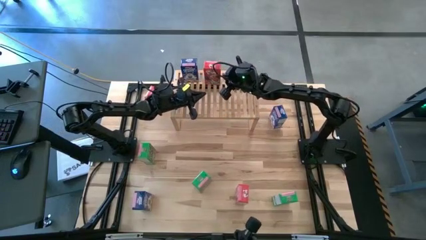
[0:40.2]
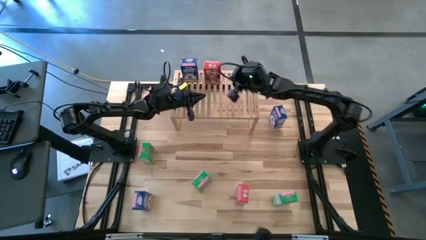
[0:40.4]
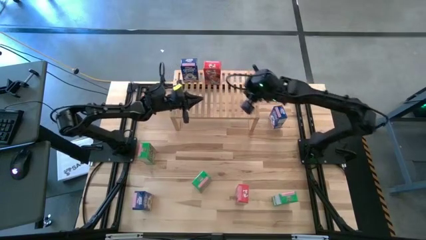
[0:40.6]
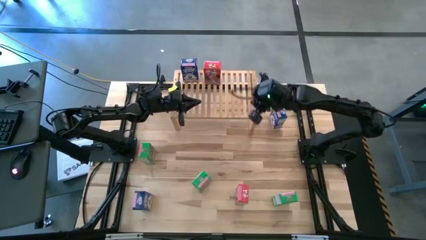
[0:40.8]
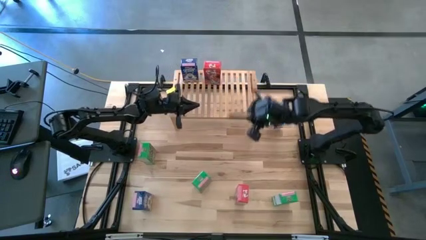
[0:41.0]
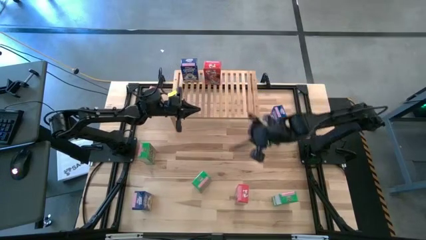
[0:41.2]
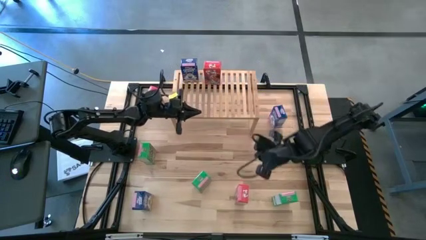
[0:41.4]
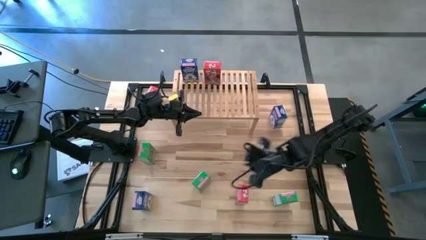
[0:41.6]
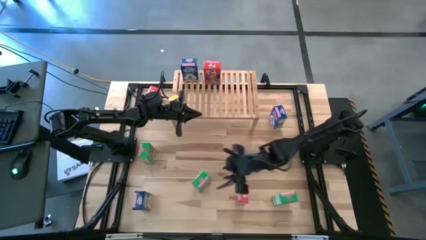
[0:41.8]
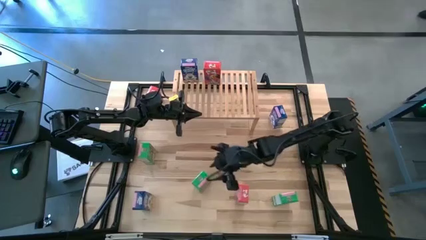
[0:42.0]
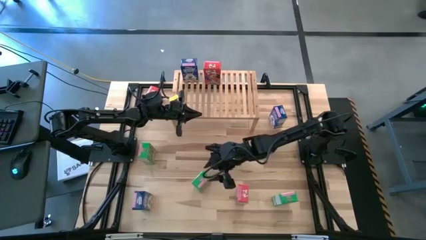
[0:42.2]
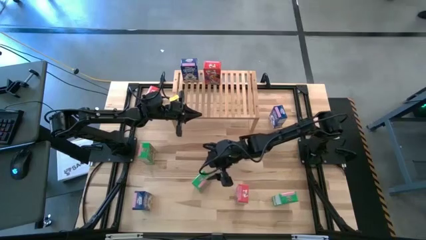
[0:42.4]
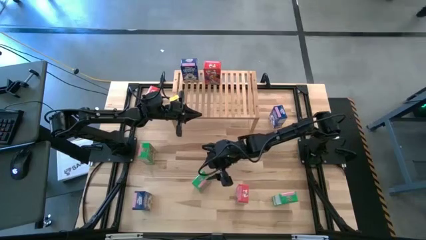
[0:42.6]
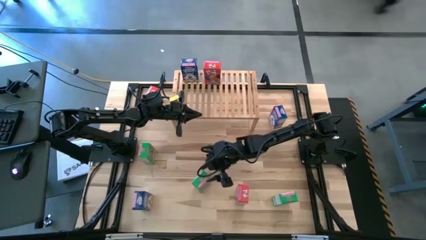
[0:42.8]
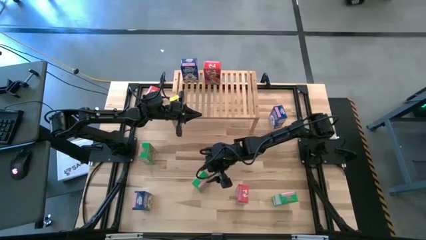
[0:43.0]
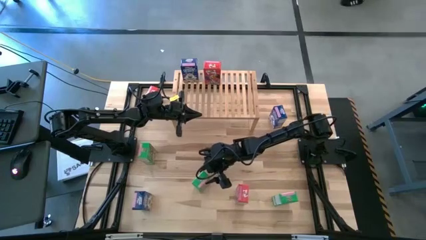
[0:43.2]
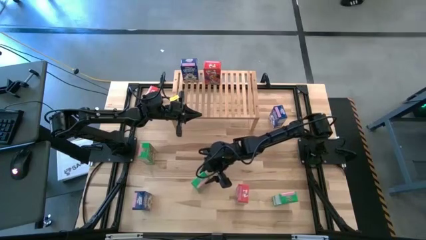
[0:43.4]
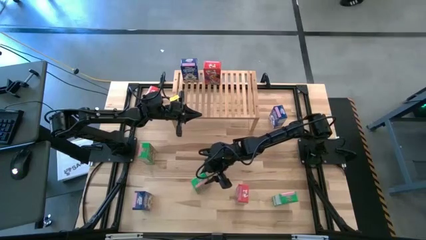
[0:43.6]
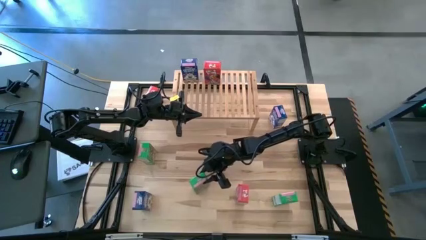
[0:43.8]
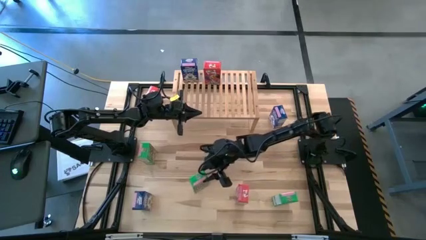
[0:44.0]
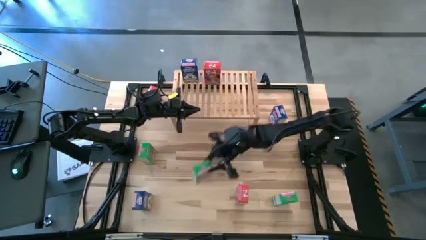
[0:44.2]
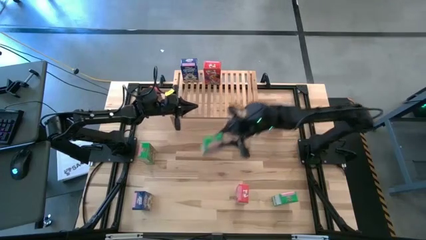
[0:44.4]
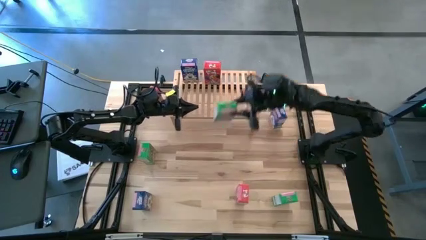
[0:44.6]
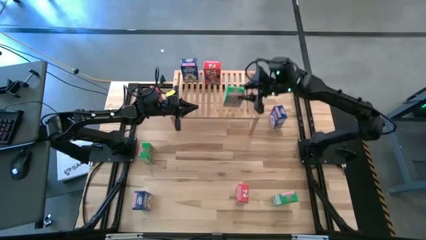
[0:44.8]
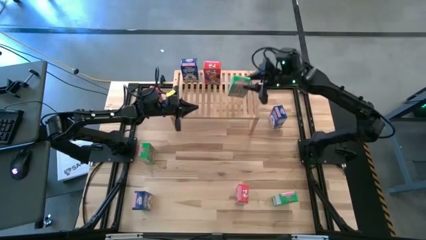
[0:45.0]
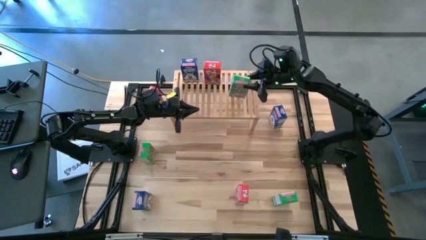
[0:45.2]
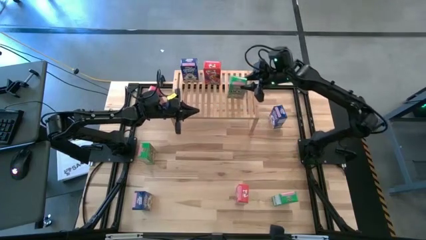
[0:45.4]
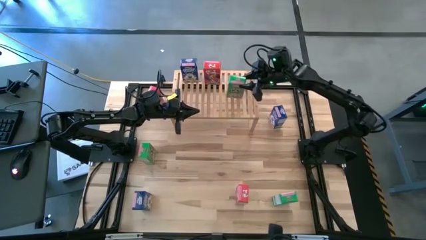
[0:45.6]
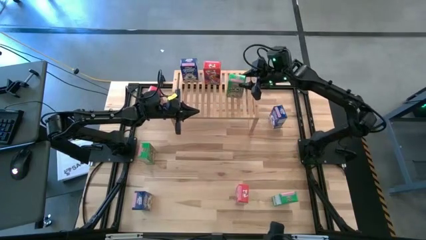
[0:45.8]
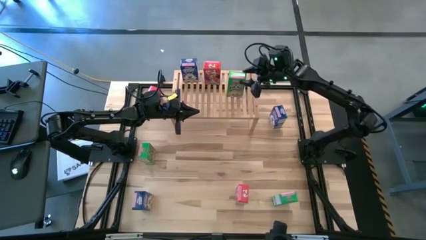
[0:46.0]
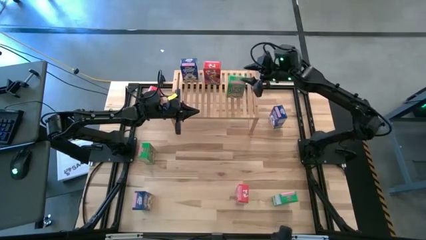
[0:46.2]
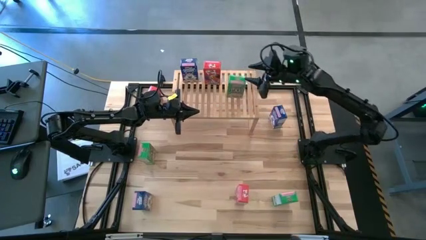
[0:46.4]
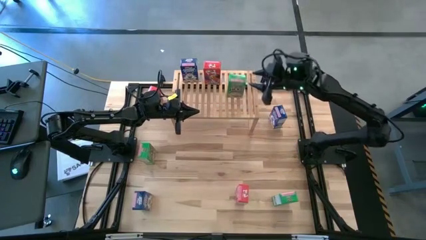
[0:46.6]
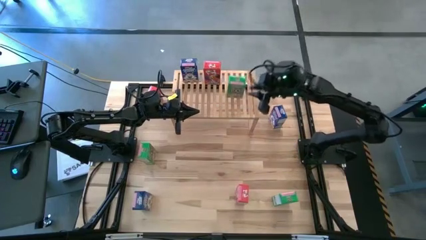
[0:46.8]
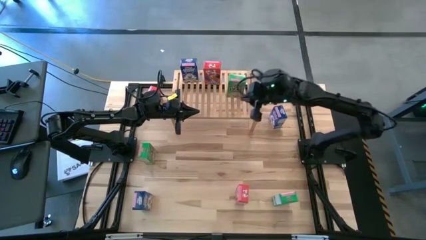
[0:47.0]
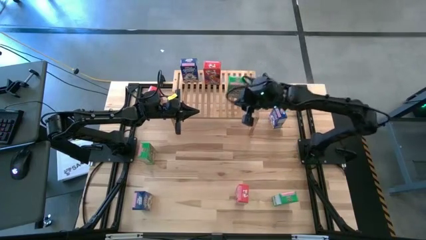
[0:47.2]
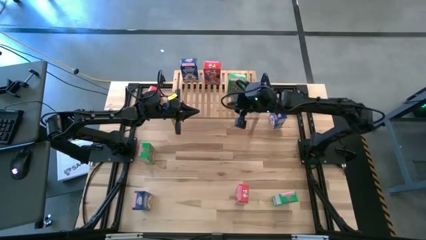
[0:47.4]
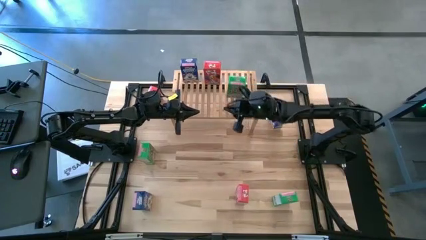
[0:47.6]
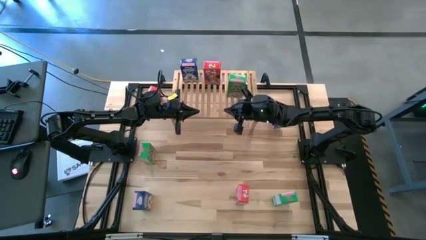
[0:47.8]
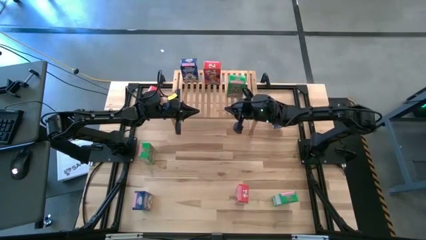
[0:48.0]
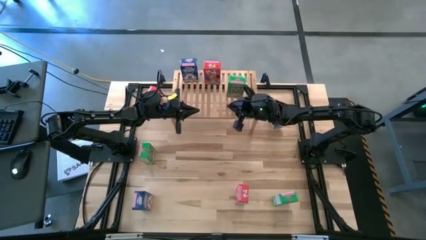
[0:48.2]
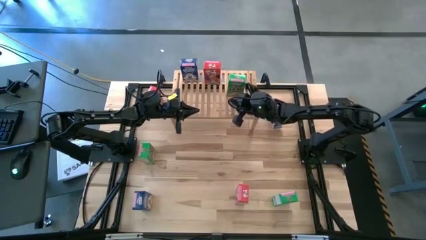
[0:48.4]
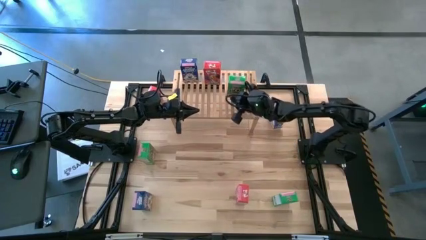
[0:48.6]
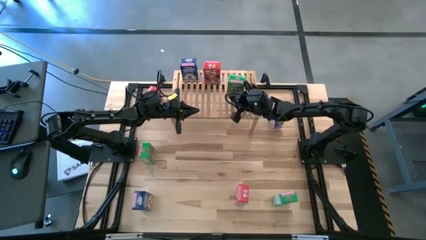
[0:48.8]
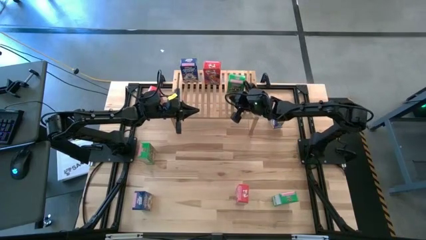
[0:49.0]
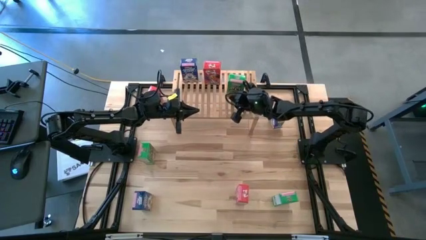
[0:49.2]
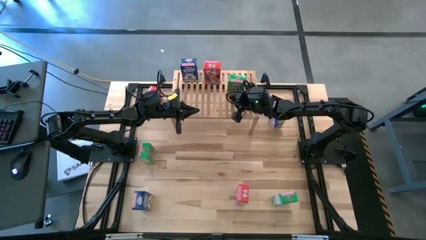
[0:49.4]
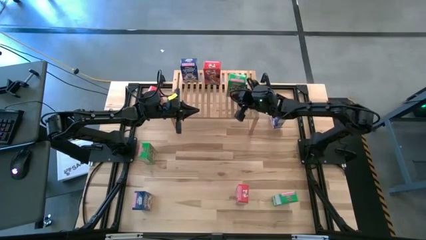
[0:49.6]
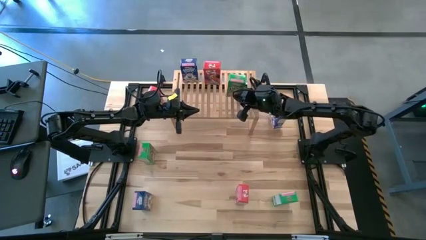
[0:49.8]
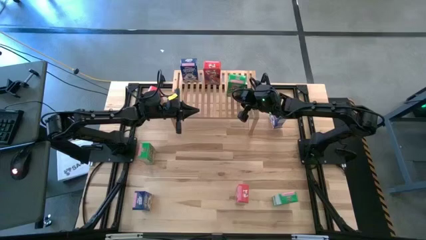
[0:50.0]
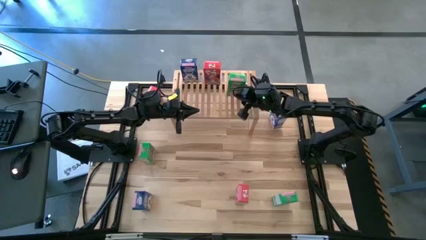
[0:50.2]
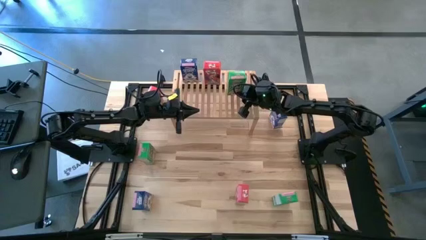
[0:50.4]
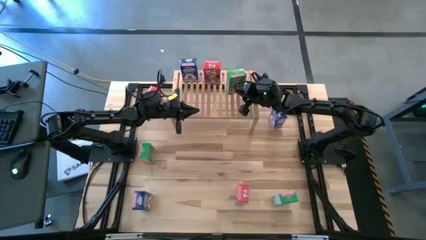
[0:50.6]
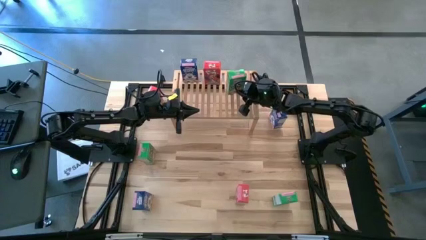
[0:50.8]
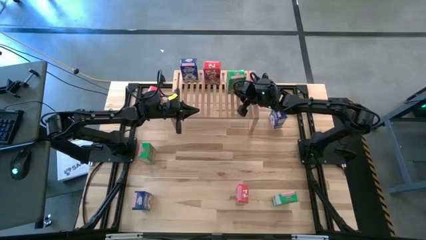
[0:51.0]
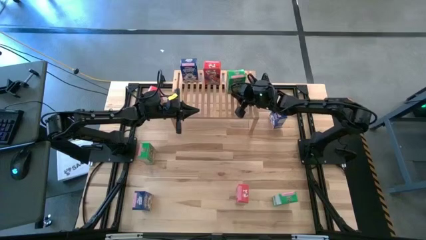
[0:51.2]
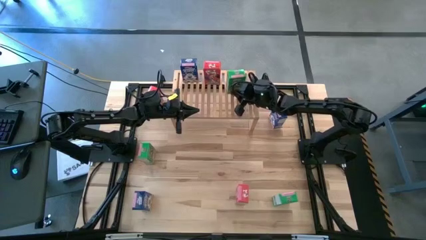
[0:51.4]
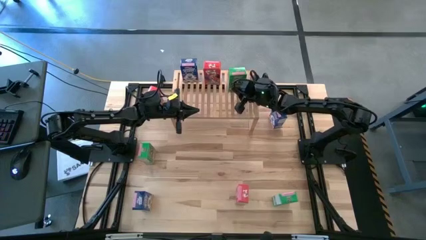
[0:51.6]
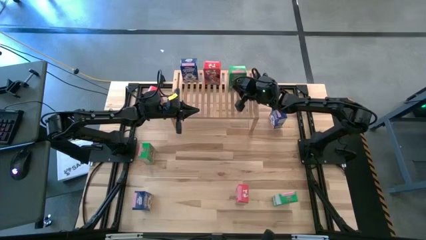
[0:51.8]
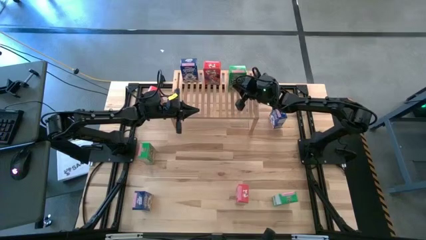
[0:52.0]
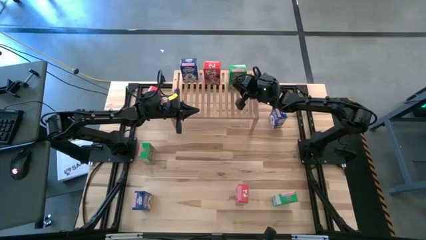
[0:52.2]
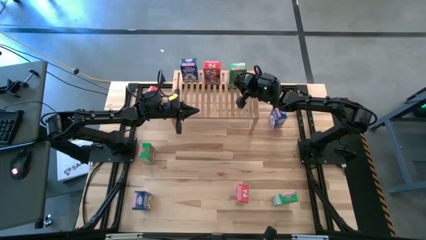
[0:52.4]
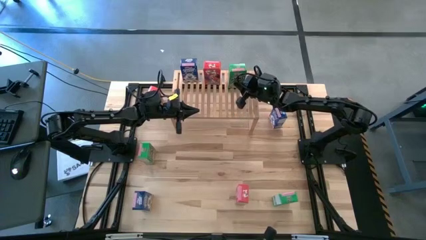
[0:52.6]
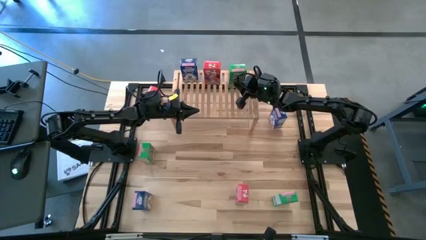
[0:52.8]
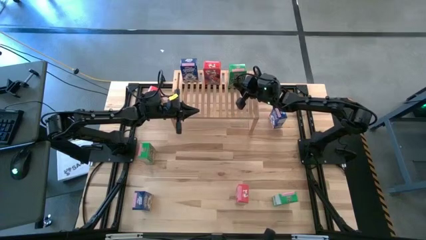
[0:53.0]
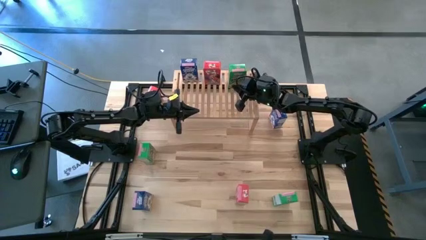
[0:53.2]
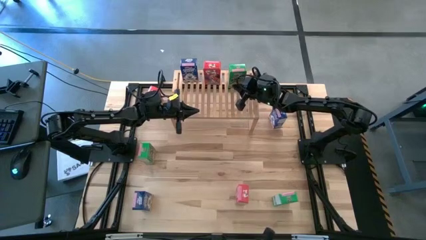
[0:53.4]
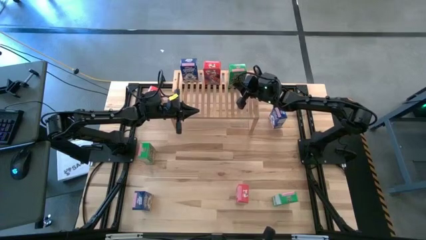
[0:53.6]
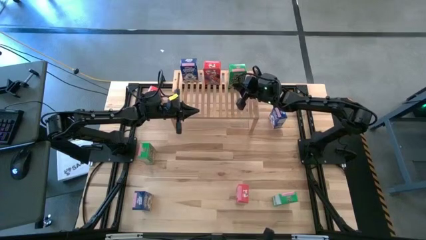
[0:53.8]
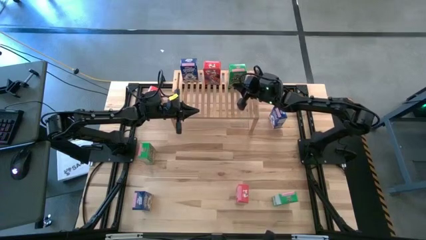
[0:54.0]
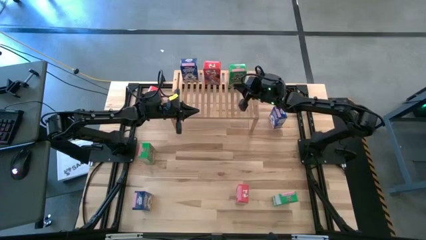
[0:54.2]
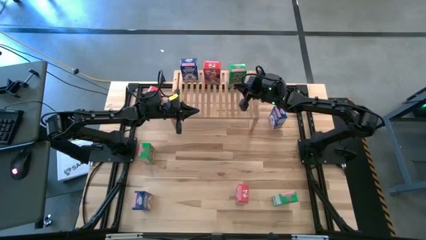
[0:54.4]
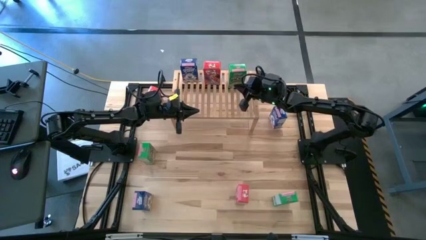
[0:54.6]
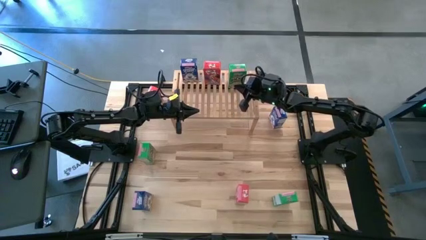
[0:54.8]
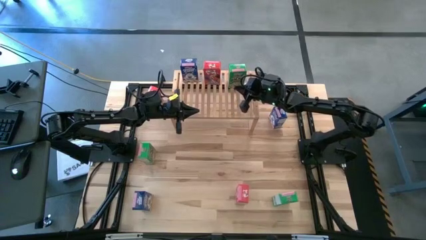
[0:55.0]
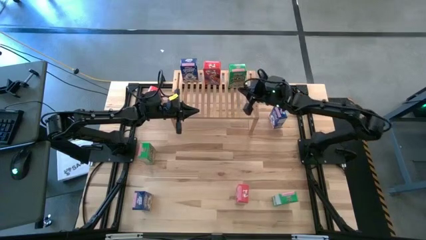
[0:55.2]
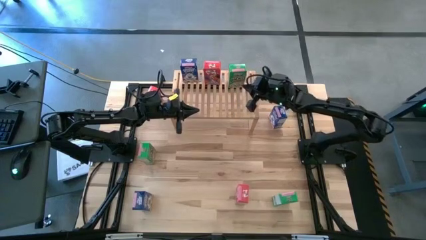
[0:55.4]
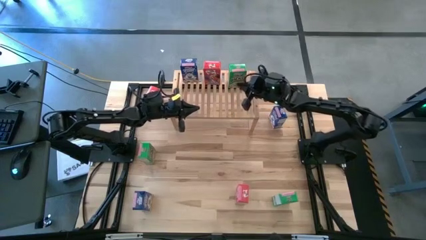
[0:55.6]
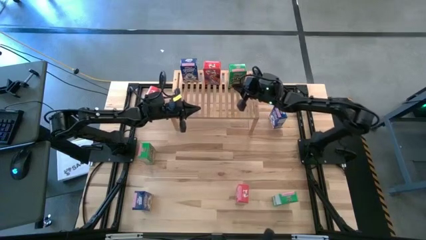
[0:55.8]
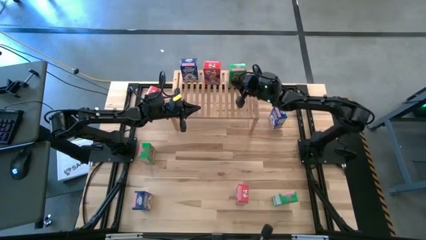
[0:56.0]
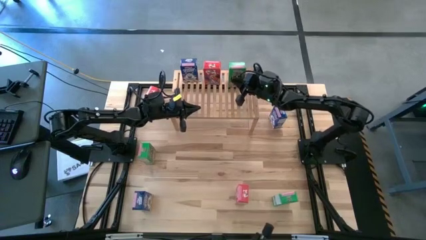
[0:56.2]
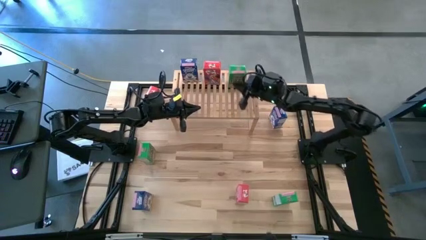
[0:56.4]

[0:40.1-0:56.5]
Task: Stack cereal on shelf
Put the middle green cereal box on the shelf
